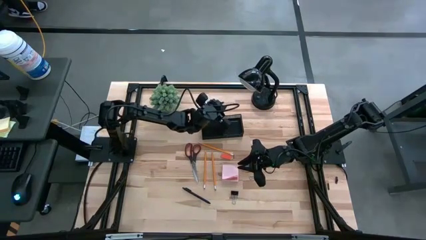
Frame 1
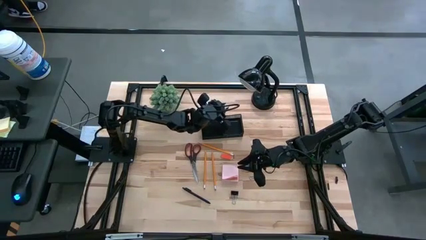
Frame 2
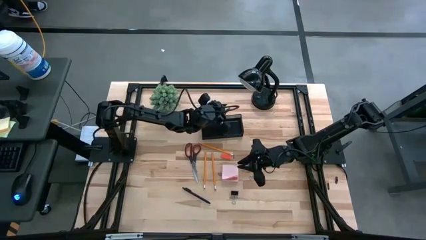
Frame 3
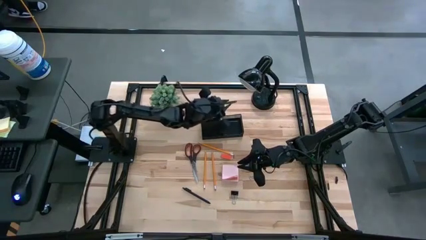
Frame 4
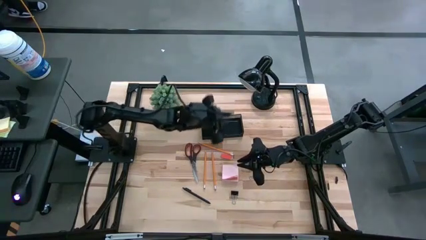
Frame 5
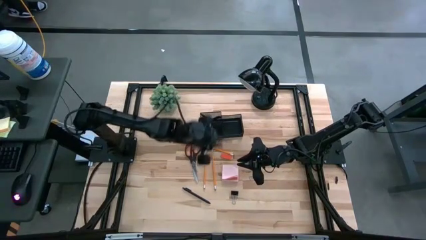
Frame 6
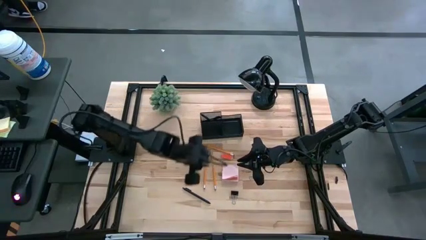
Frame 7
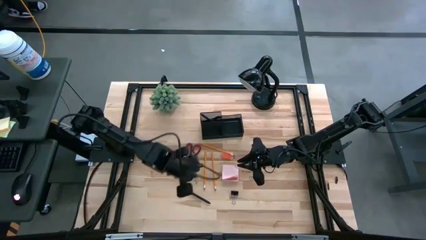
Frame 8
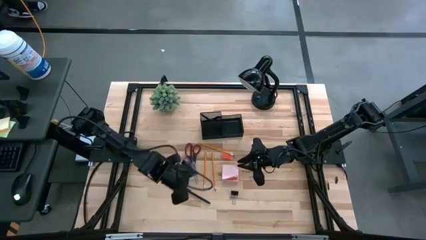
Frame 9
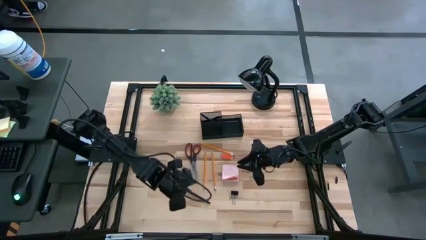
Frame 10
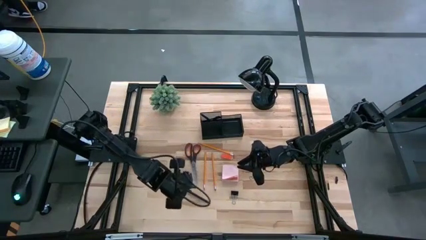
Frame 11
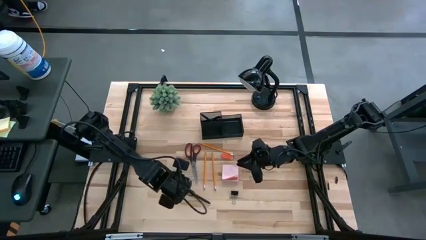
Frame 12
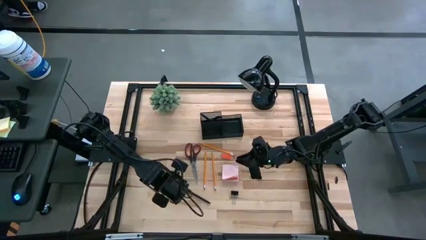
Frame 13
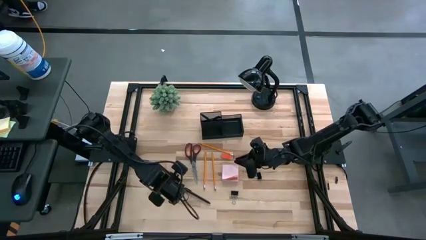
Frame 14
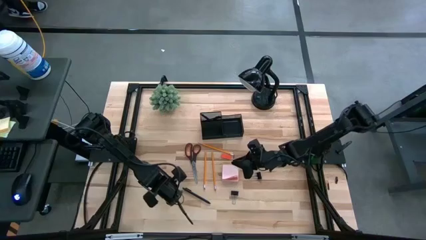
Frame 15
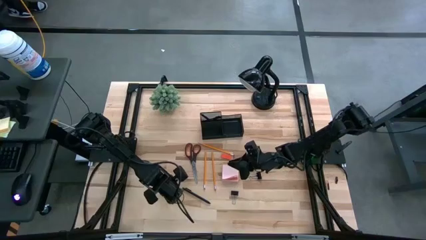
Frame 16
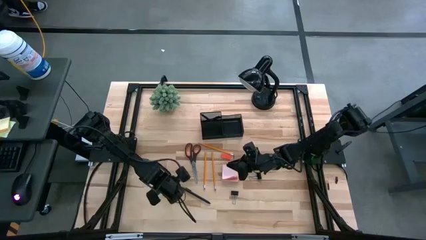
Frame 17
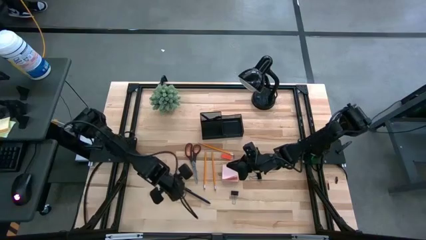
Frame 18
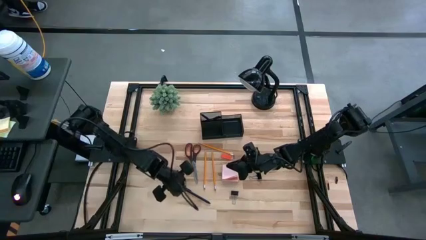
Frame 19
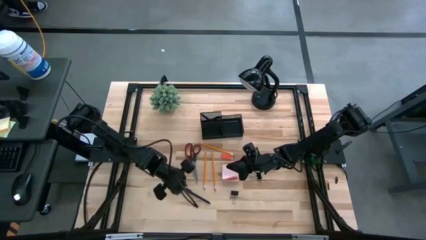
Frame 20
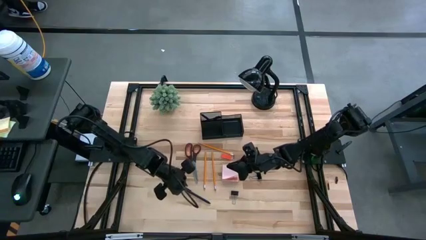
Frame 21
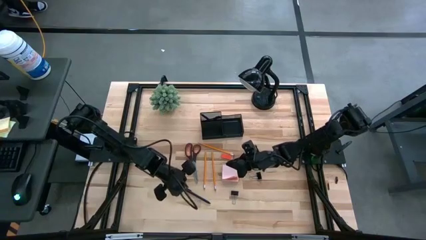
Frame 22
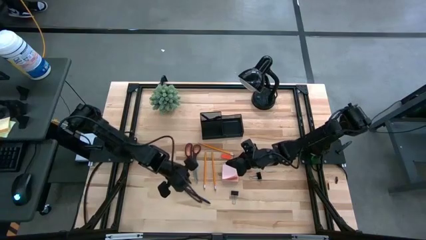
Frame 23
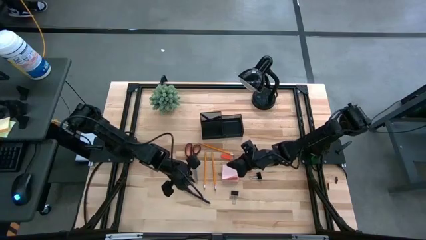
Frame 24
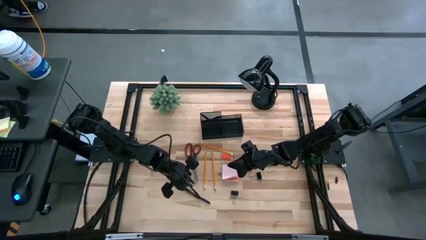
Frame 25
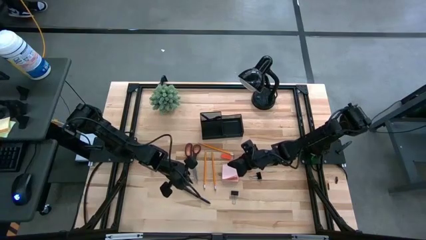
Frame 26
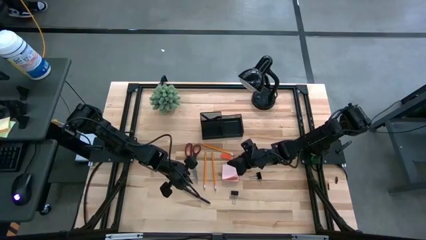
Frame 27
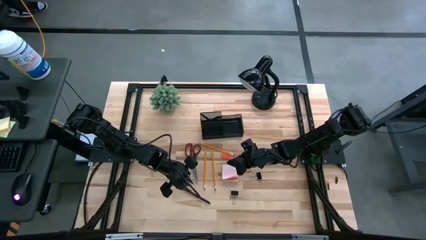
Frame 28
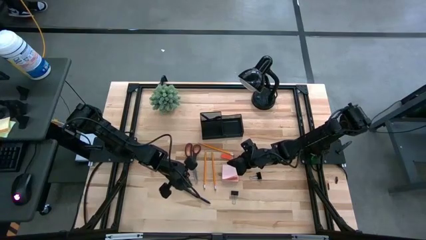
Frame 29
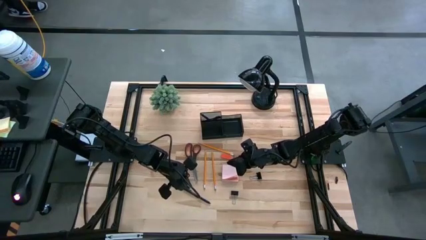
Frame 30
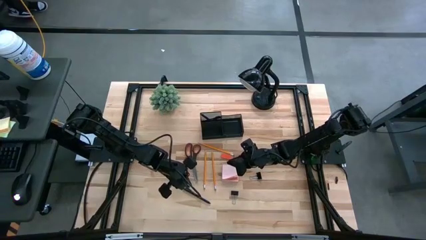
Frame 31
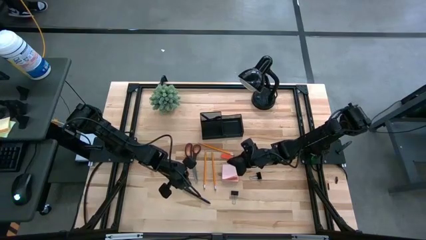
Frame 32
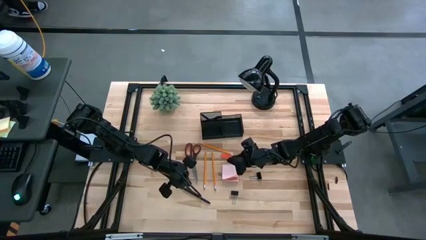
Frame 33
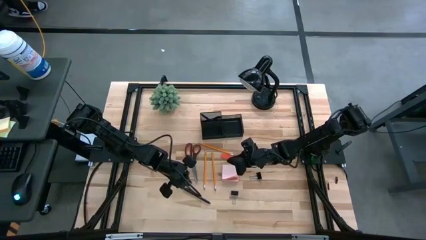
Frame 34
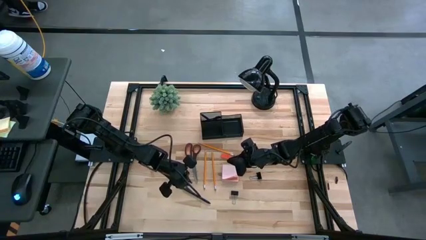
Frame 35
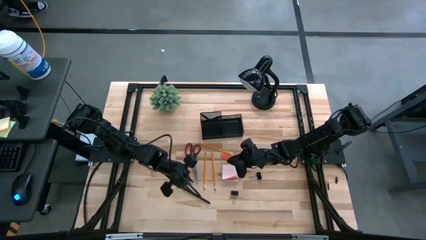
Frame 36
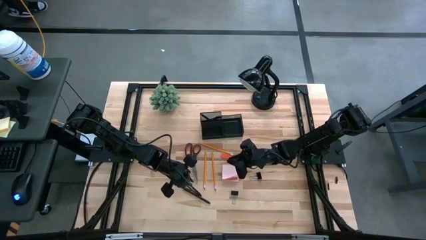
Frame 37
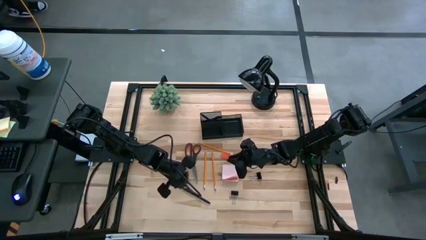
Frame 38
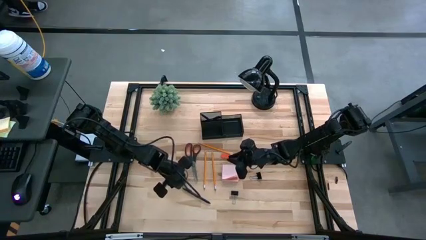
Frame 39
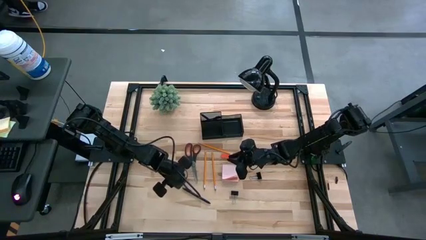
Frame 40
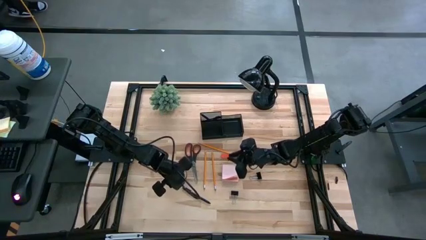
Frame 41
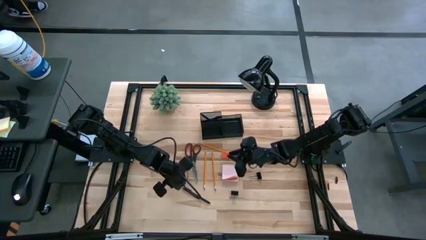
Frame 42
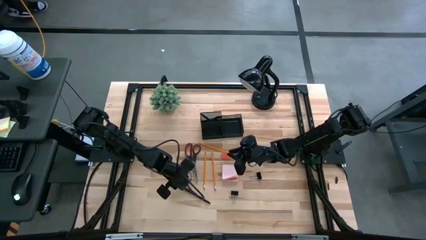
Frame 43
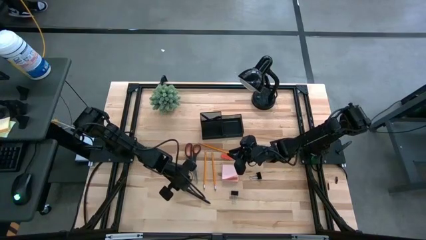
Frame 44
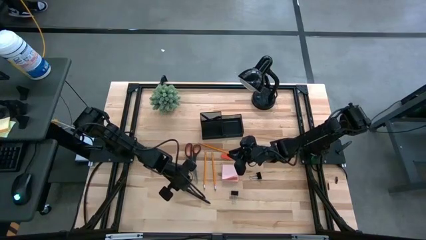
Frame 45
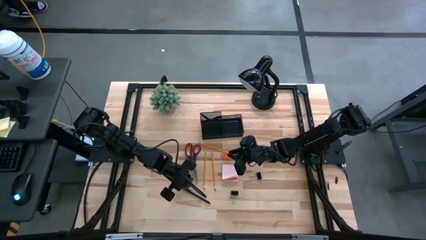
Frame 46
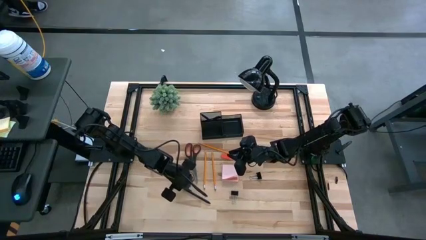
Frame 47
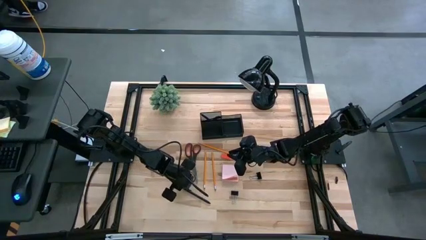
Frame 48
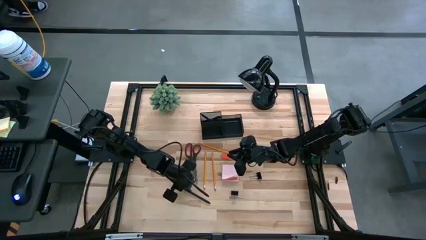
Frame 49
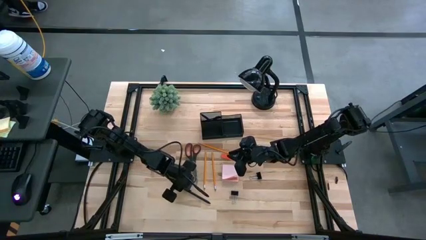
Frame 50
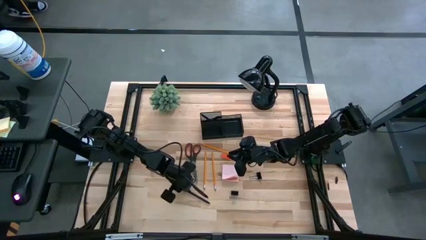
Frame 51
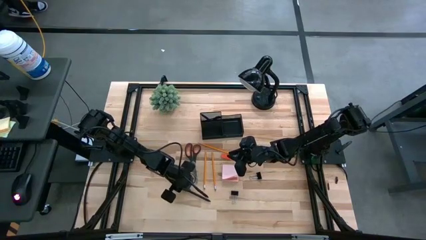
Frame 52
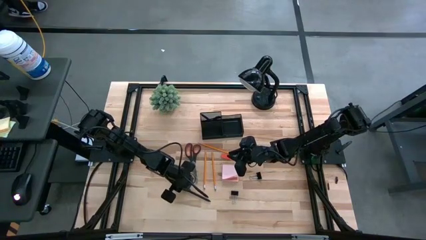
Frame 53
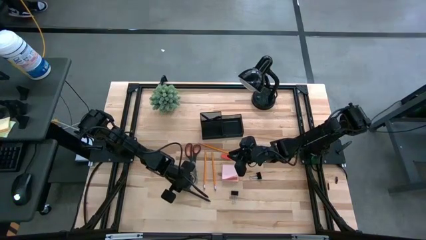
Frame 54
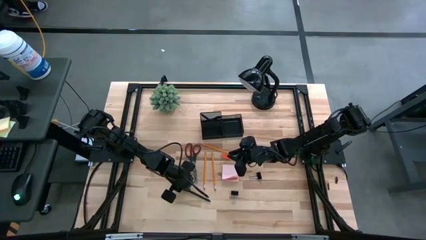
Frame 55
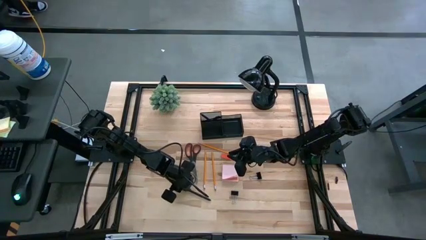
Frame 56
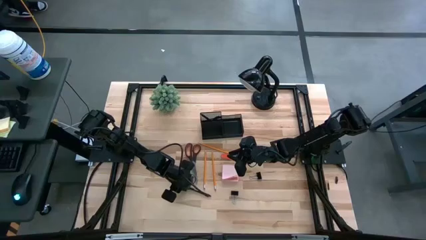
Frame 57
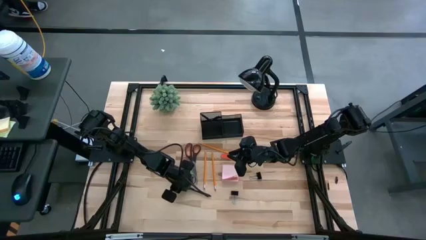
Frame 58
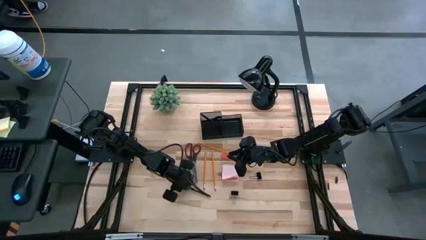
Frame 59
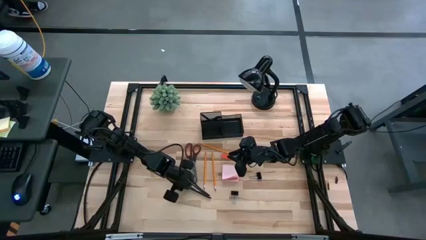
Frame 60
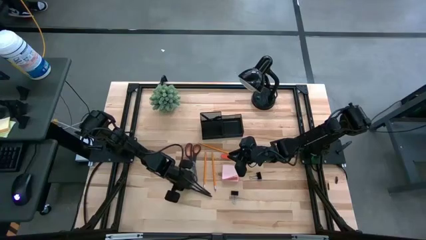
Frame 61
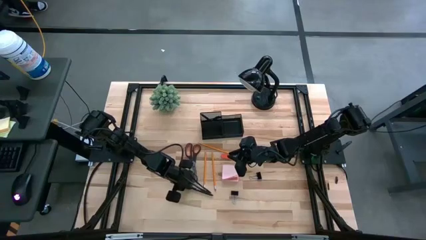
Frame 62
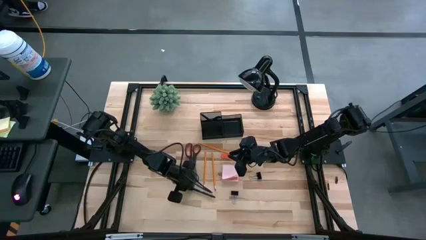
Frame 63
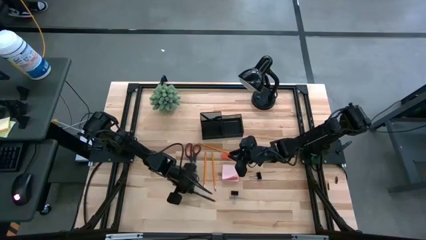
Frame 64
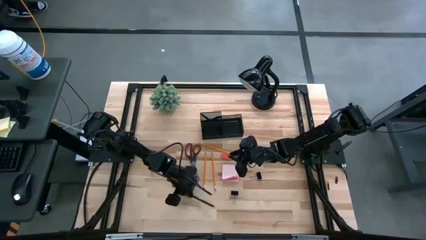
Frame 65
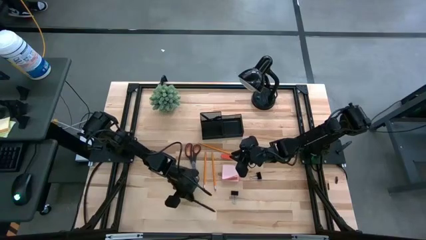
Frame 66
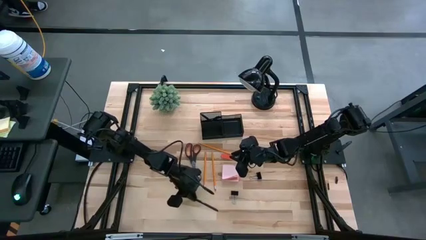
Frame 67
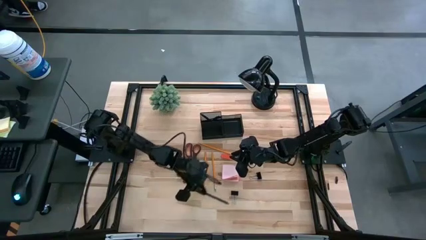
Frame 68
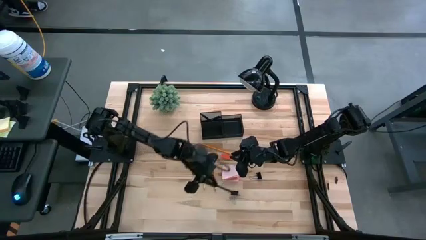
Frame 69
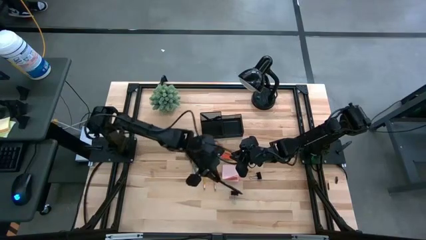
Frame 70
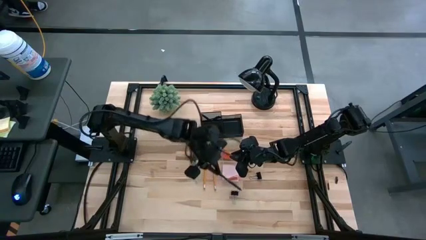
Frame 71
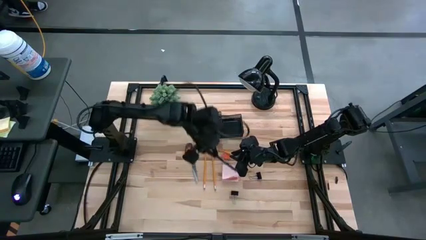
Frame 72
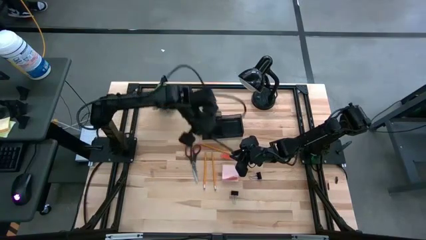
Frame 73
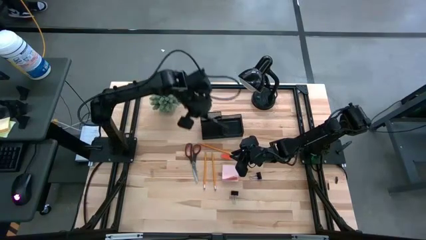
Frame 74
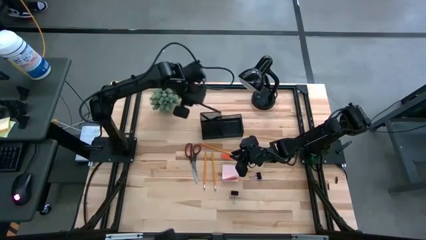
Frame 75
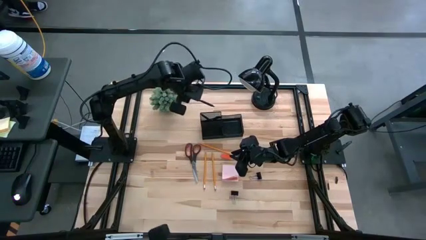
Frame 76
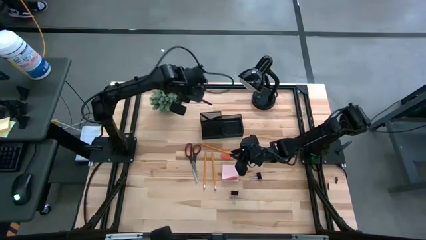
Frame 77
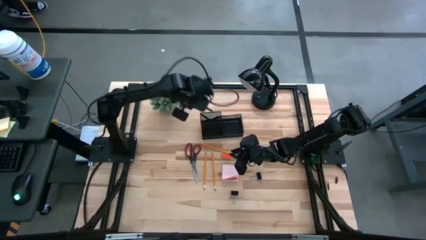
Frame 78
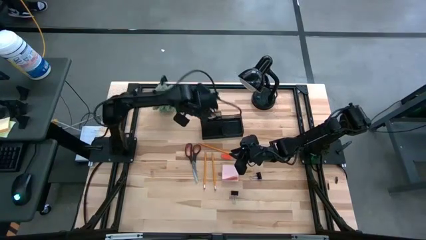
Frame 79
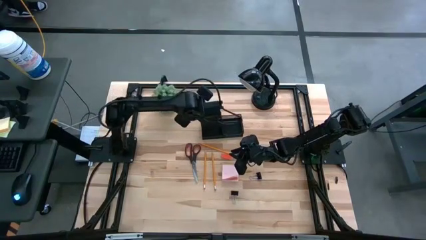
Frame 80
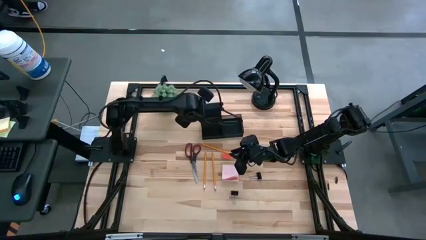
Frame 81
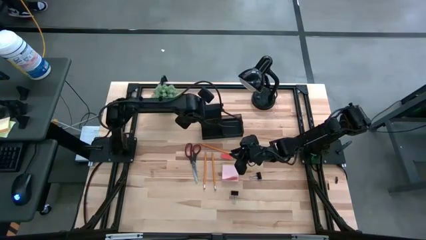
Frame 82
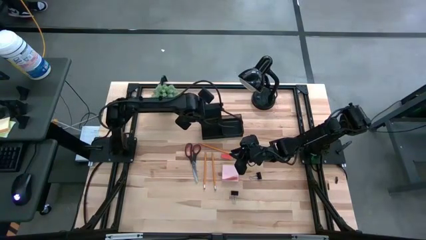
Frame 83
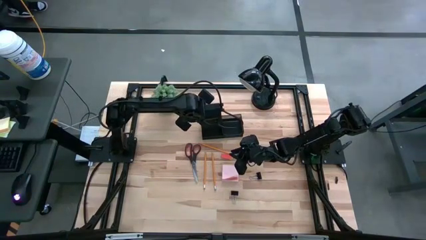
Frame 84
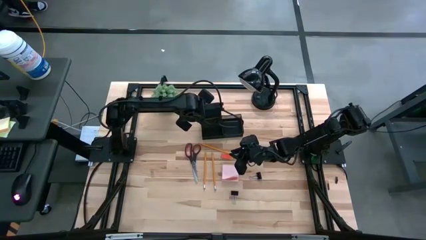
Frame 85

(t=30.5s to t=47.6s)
Task: Pick and place office supplies into organizer
Put the black pen into the desk organizer
